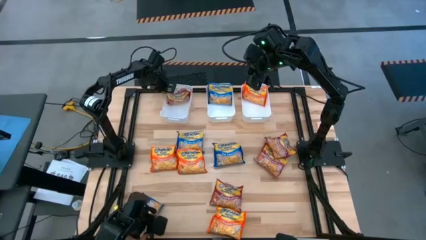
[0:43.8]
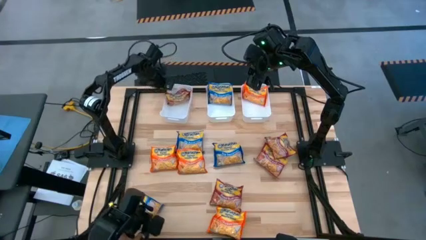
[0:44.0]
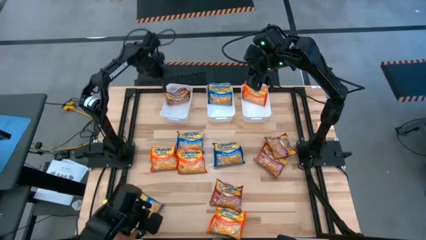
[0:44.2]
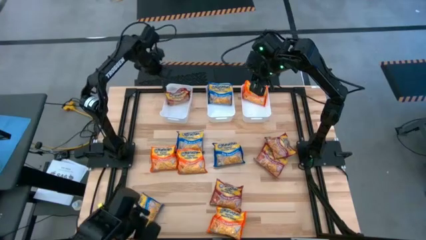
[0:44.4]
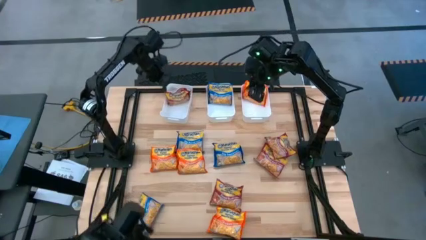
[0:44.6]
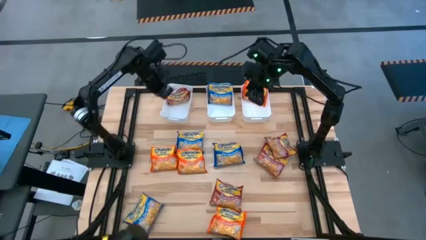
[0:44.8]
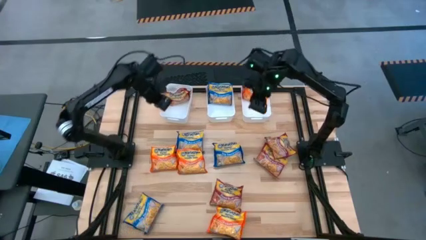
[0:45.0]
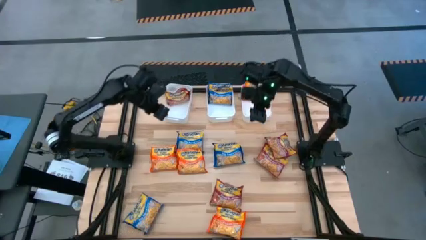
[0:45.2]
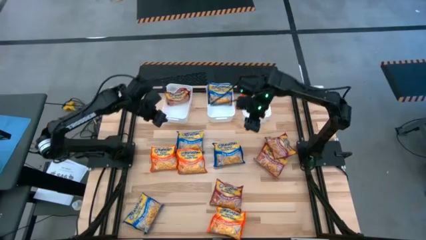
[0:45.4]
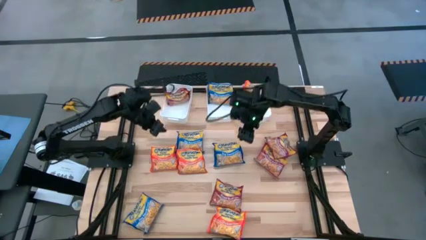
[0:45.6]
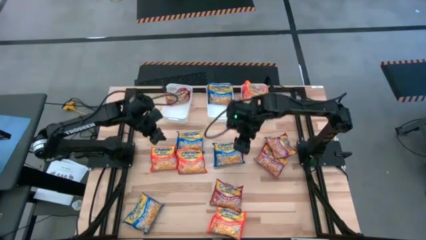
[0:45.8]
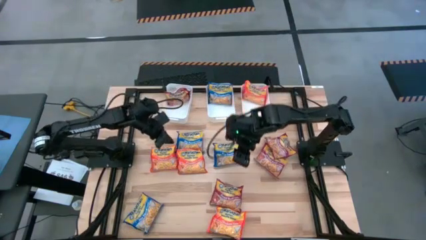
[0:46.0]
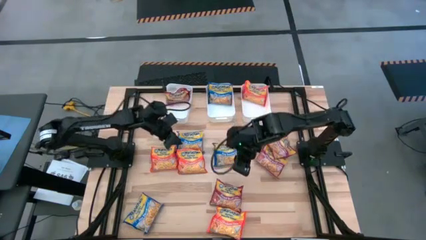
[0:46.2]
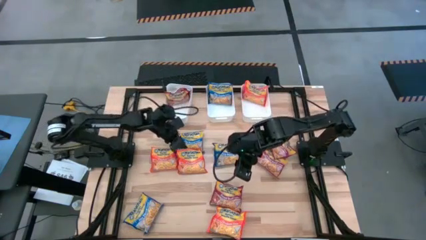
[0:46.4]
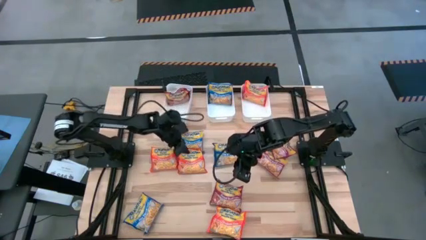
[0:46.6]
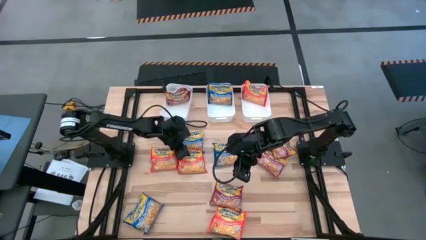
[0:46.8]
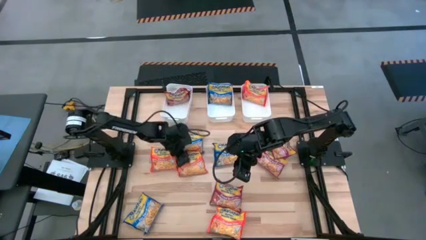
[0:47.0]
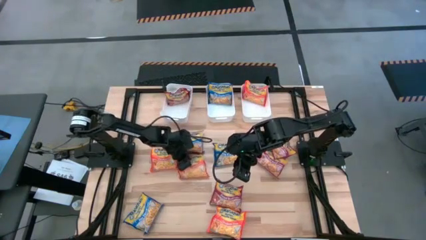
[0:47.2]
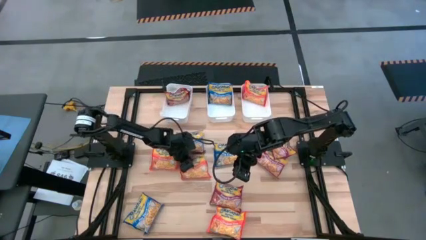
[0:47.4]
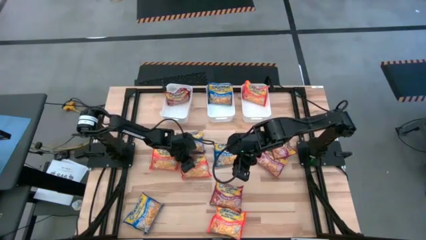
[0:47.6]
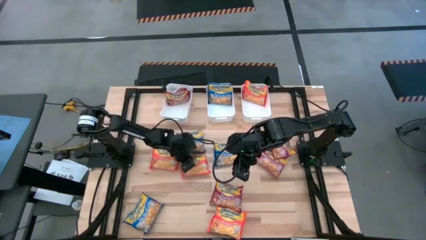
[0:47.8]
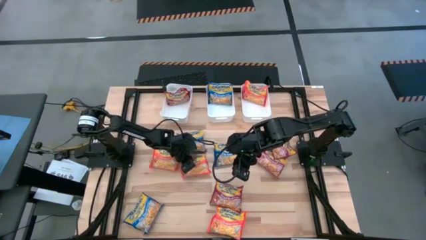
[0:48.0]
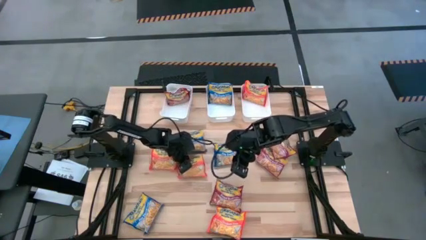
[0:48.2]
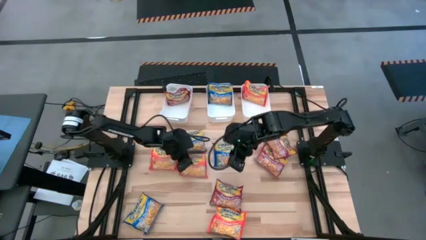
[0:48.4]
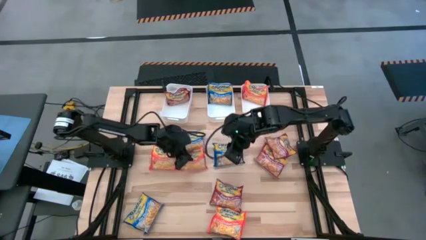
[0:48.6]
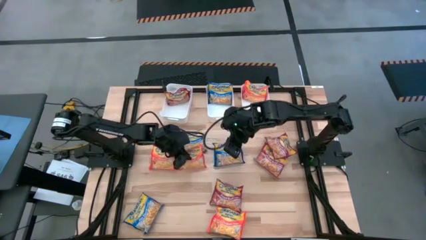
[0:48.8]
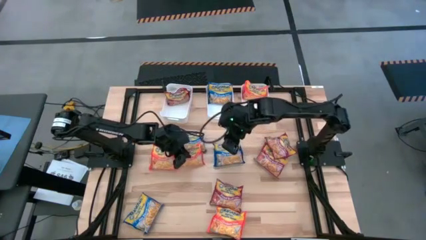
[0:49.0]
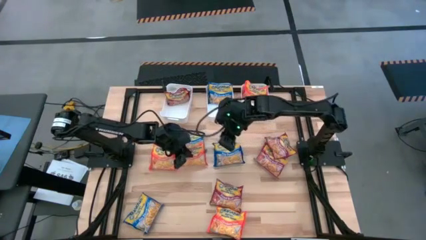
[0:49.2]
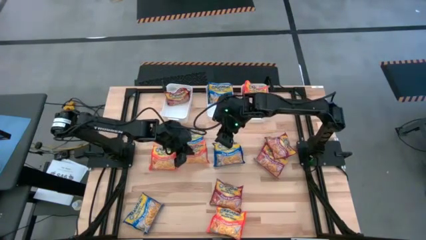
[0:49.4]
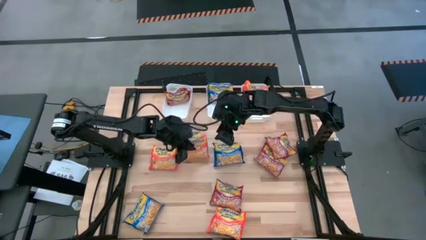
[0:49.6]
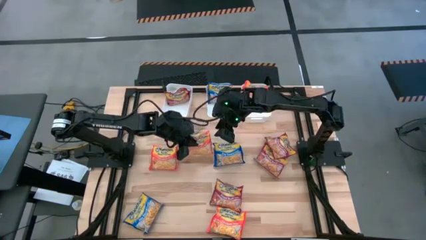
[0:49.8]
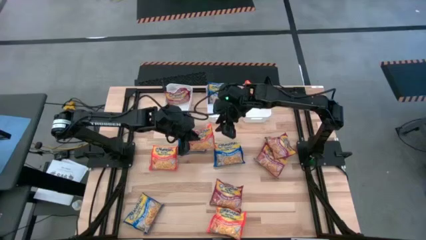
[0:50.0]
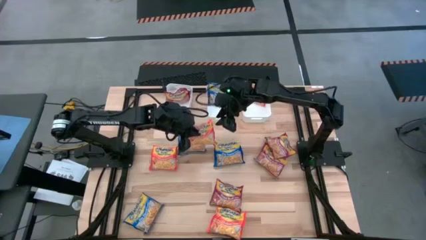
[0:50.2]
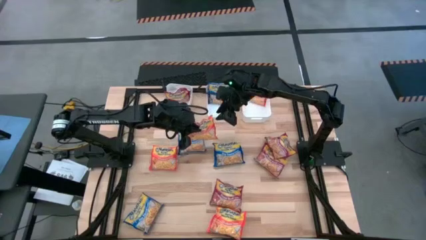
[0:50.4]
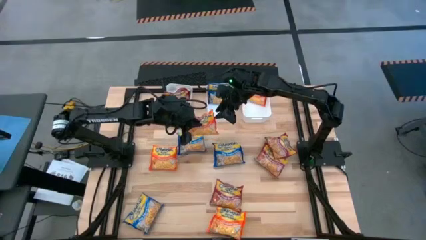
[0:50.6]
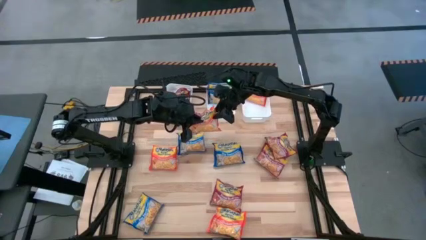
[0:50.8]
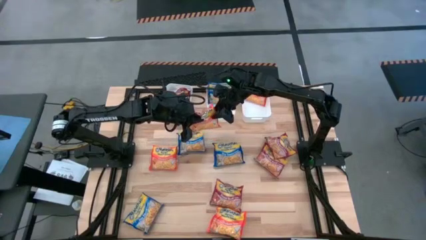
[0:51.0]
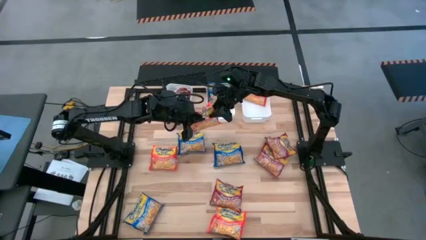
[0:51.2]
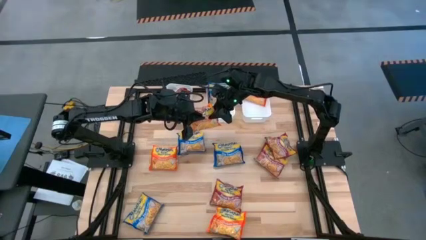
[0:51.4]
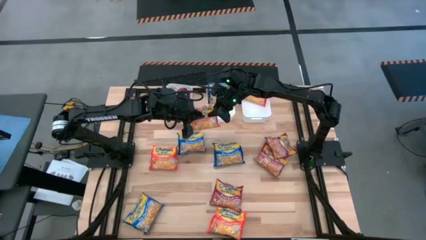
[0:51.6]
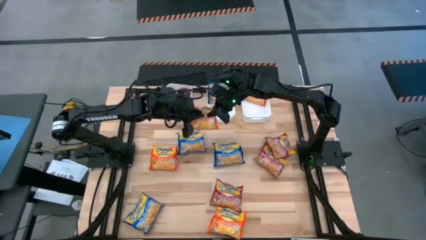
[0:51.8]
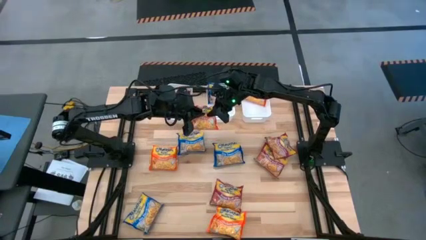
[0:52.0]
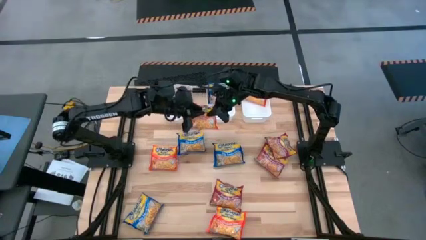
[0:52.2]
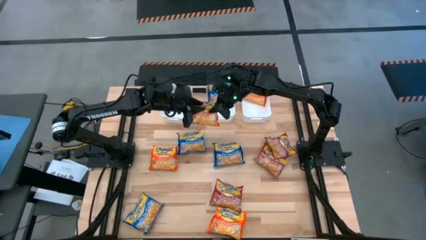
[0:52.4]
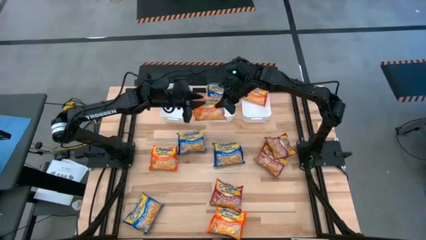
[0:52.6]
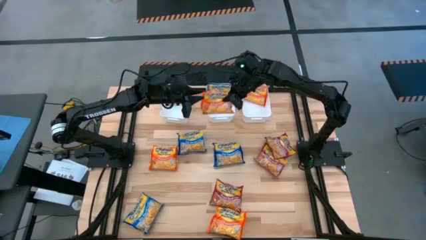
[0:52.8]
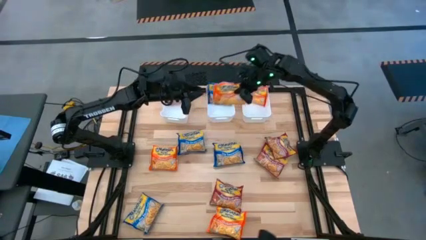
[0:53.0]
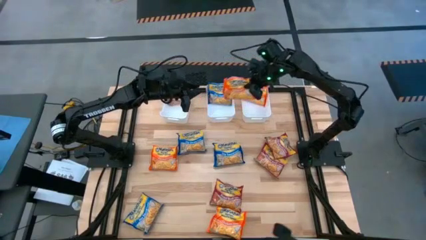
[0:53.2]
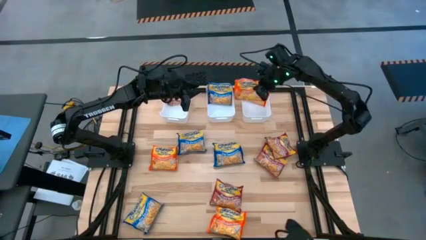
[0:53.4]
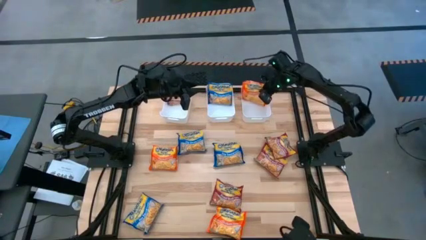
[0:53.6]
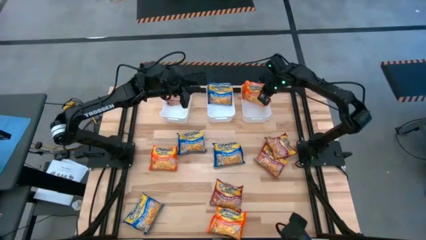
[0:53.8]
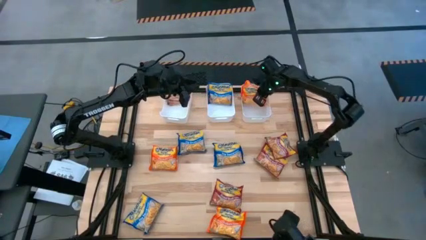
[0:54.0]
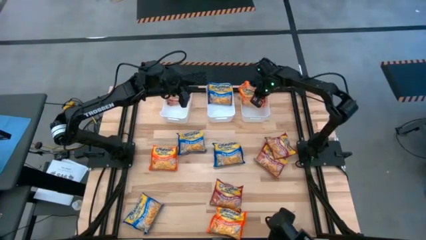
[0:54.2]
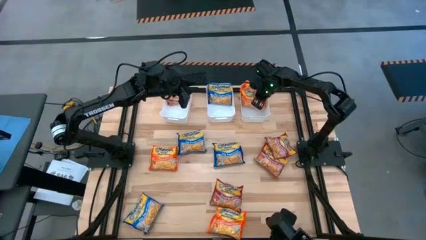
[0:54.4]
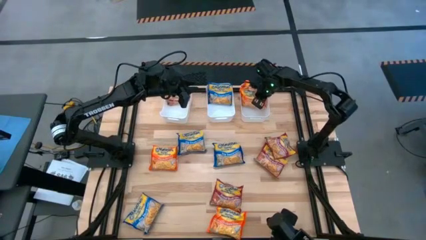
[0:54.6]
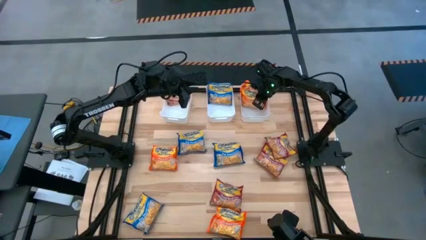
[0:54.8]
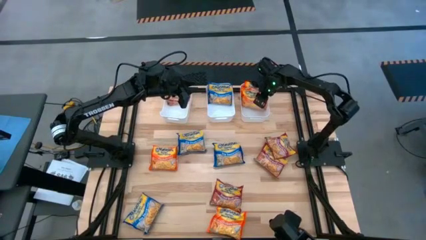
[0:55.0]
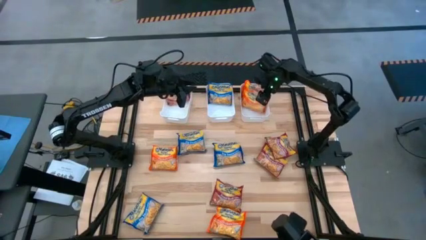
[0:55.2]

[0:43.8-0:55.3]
Task: Sort Maruchan noodles
Put the top right orange noodle pack into the top right white bin

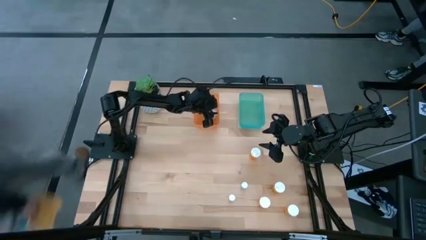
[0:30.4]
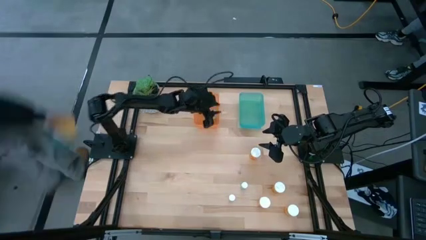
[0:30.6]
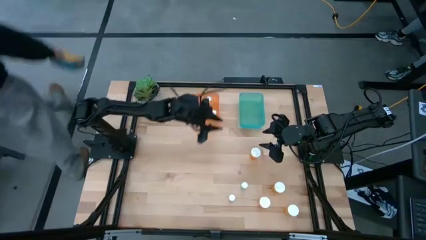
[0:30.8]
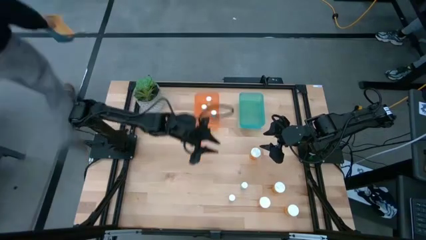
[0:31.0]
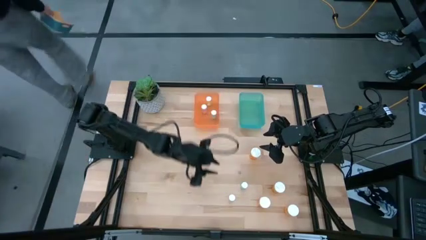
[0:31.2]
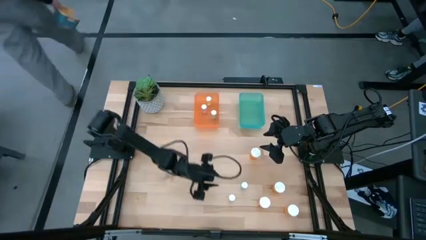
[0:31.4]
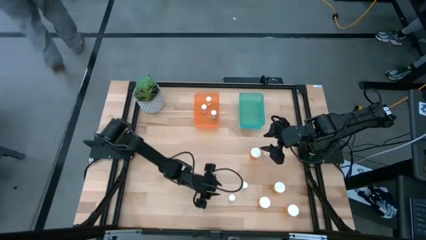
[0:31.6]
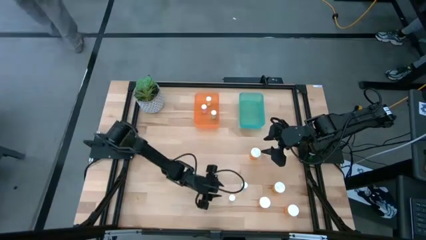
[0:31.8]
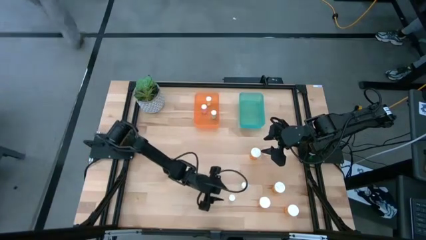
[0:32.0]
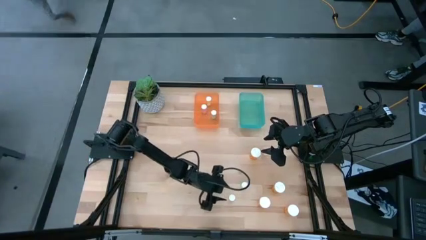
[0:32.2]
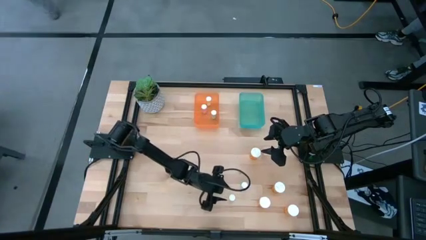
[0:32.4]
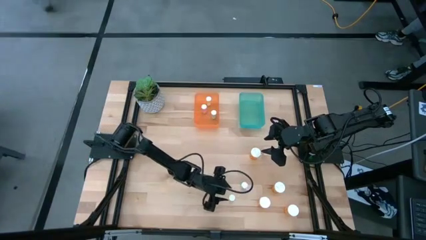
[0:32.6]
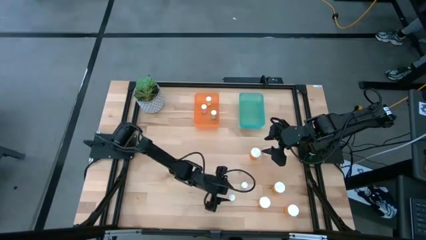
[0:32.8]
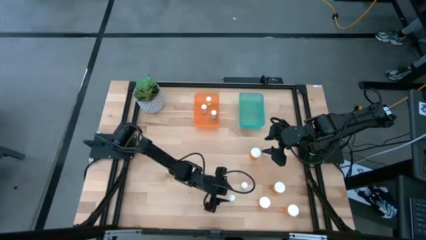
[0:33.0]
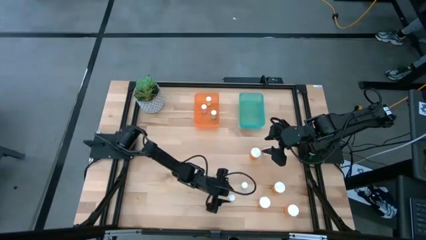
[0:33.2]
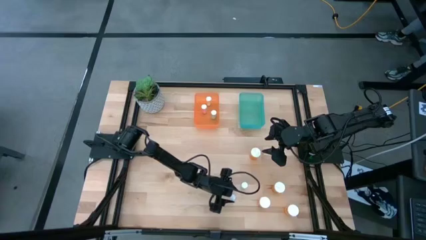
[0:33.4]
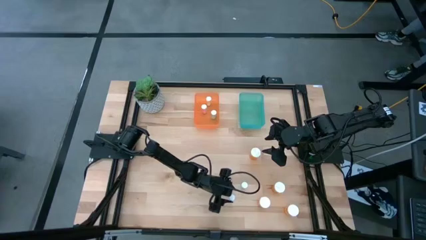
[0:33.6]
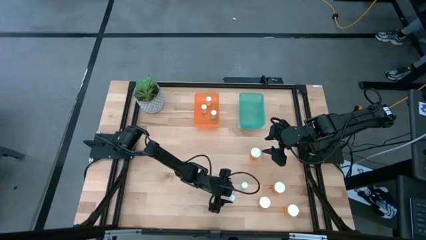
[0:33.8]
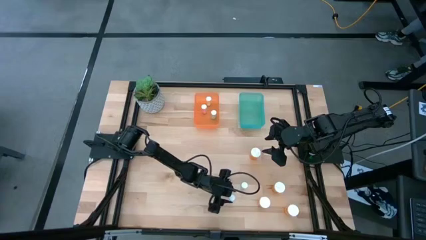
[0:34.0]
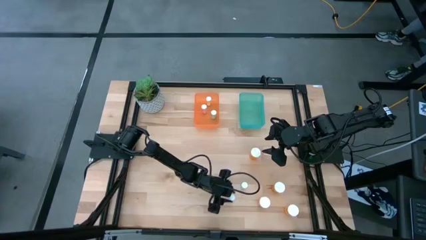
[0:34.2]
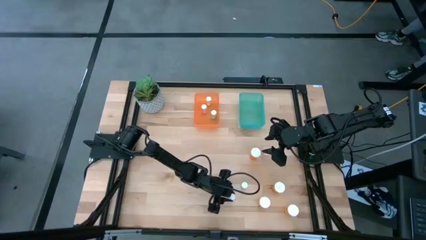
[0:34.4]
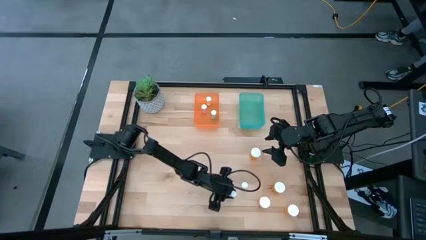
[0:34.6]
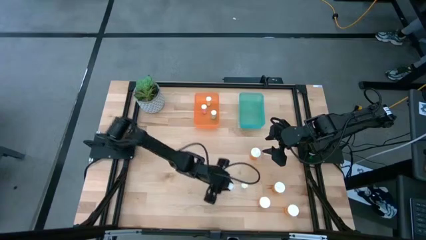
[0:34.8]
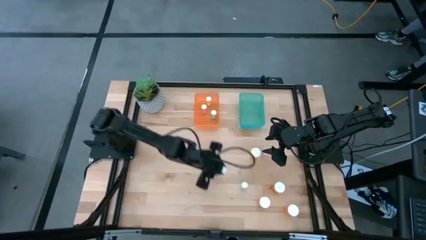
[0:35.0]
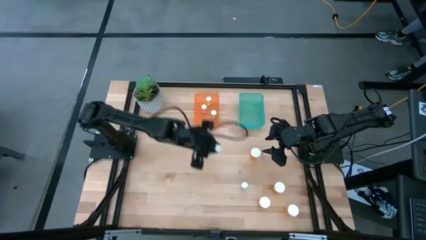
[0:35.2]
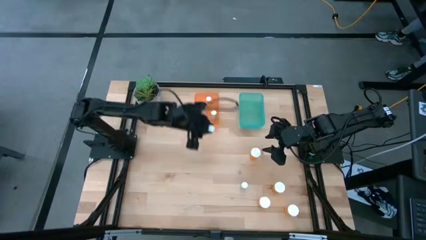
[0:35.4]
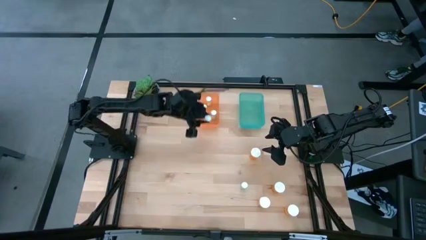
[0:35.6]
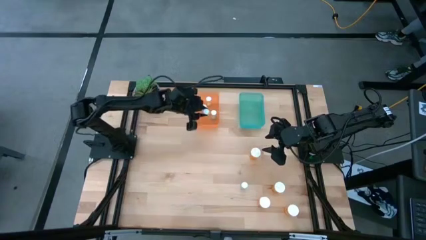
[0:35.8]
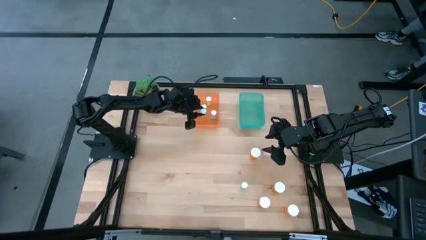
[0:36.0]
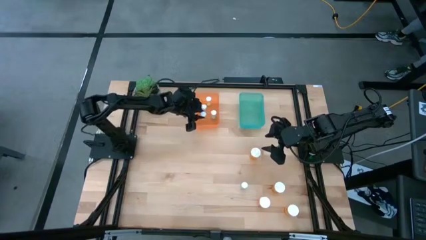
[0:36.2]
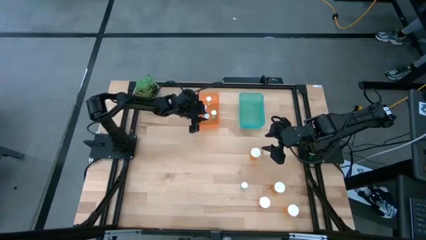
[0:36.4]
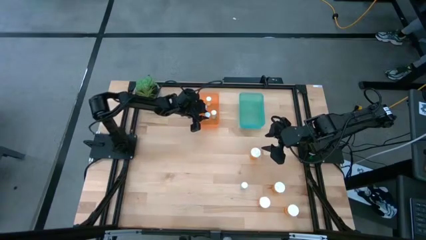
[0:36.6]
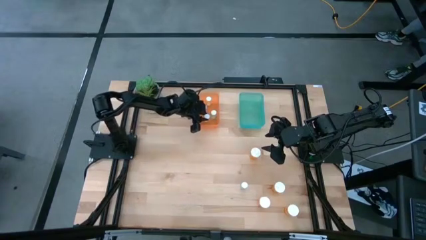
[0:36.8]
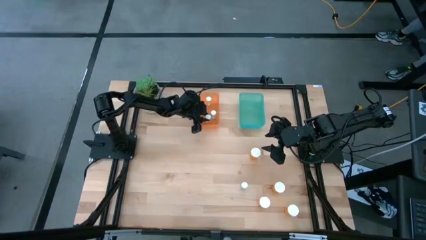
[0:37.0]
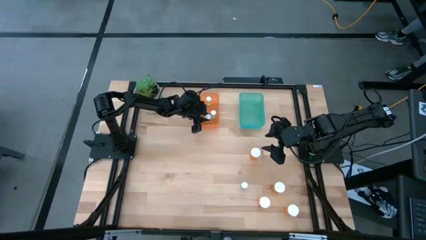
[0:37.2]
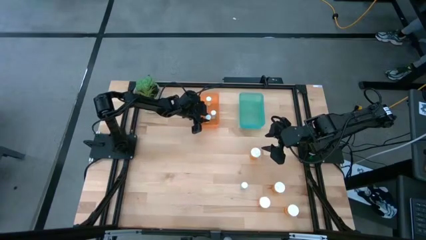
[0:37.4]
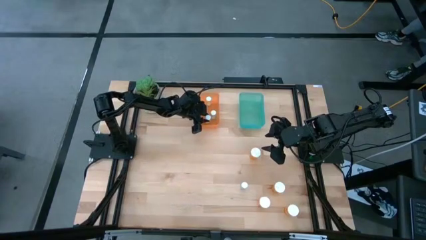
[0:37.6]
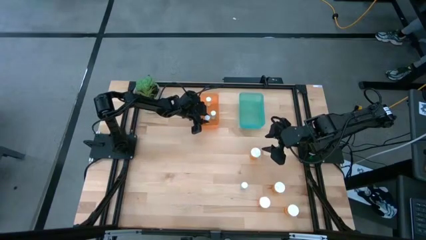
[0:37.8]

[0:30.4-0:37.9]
Task: Pick and place medicine bottles into bin by pill shape (circle, oval)
Put the small yellow pill bottle into the orange bin
